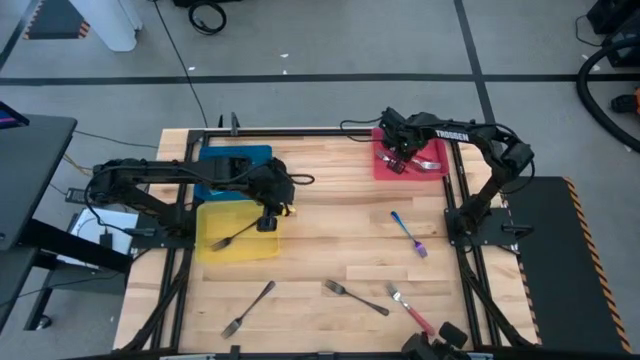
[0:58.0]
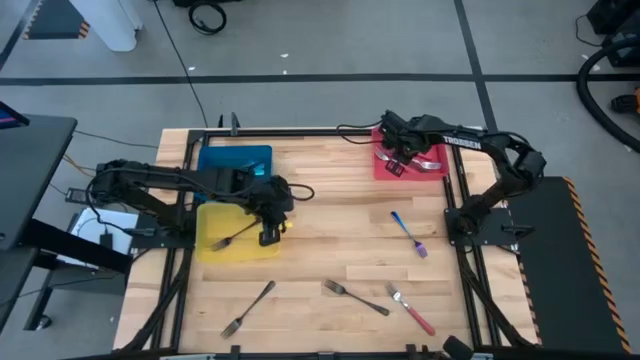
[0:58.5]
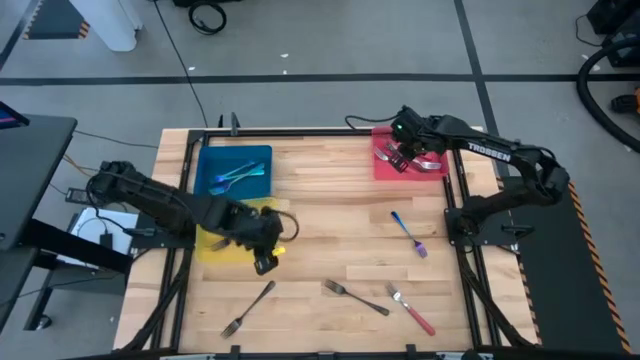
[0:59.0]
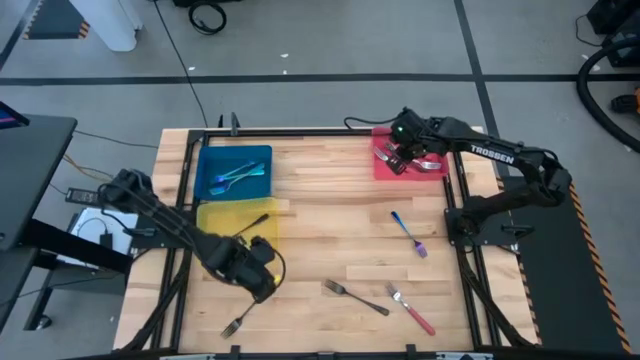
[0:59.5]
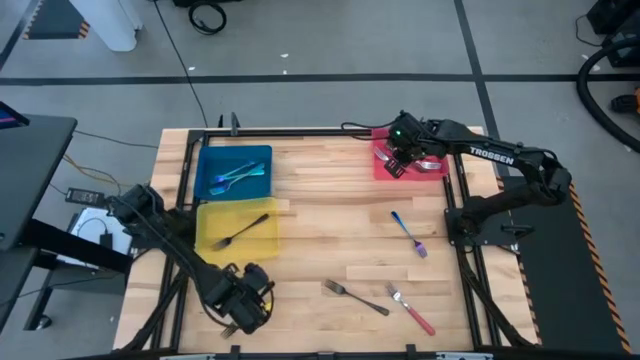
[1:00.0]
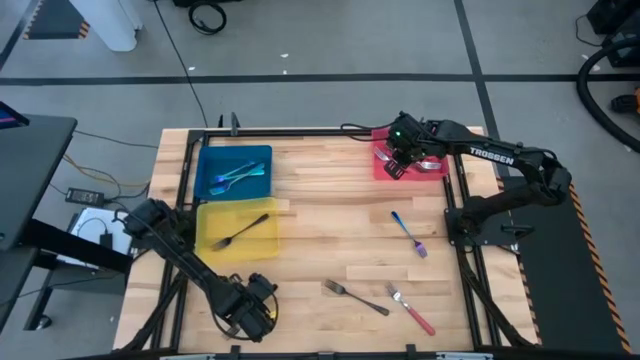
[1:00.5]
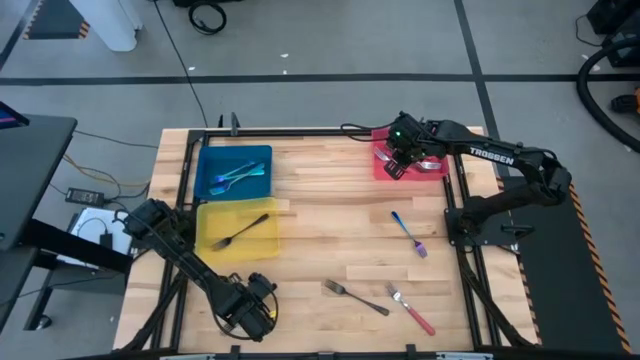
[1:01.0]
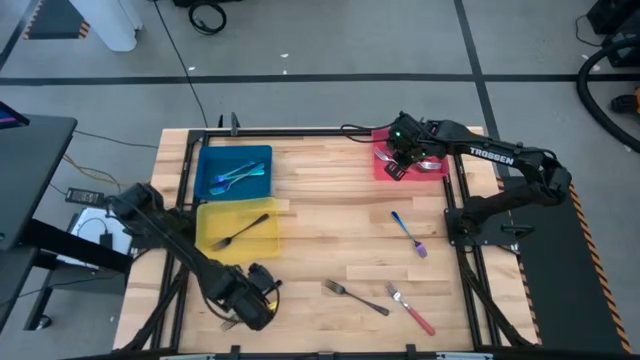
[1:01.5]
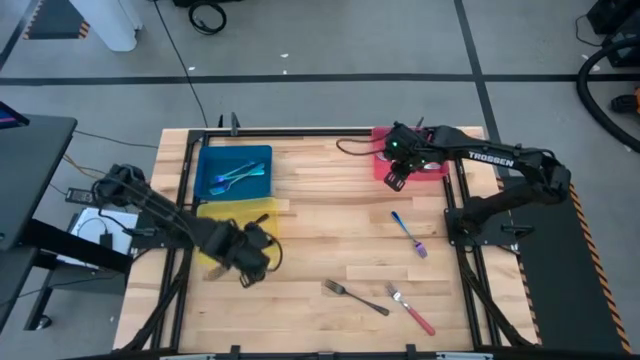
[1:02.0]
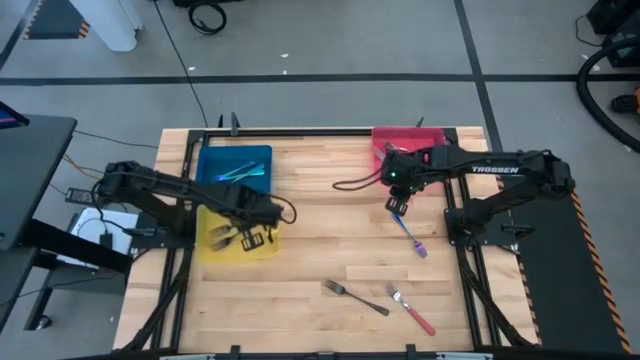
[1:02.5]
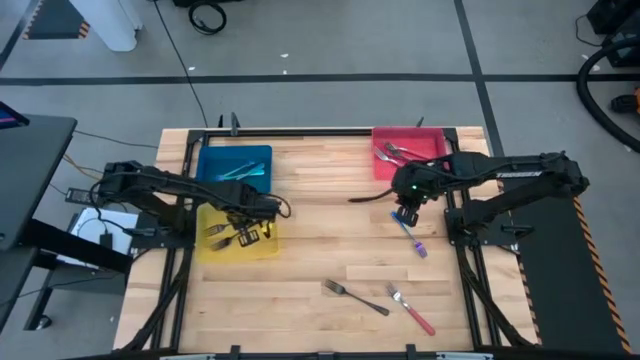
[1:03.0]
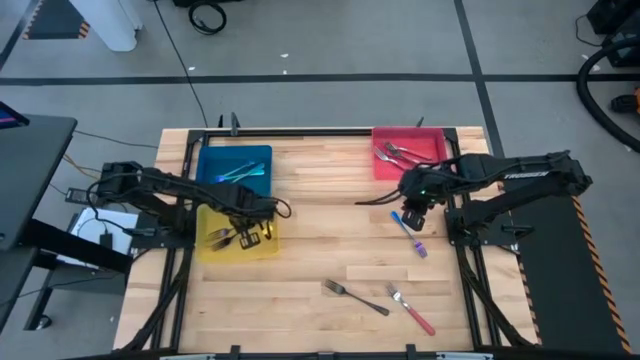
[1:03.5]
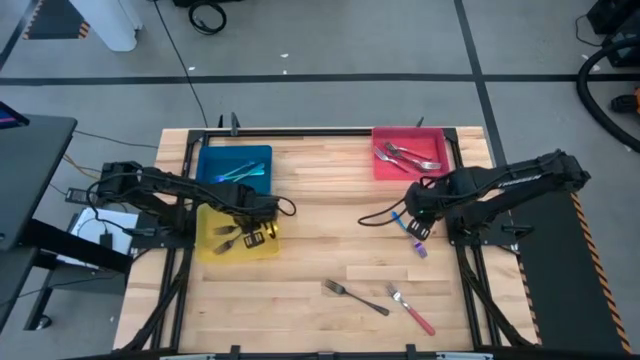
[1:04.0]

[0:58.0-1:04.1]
Task: Sort silverware by color (type)
Put the black fork into the yellow bin

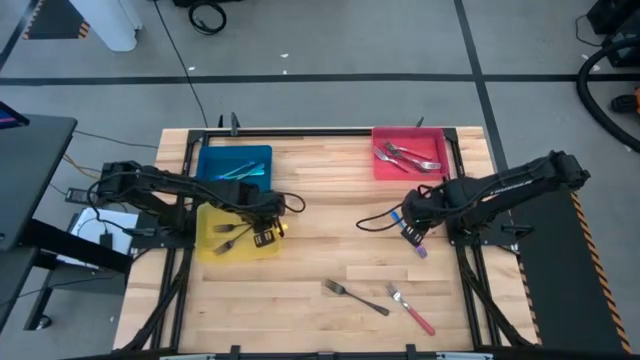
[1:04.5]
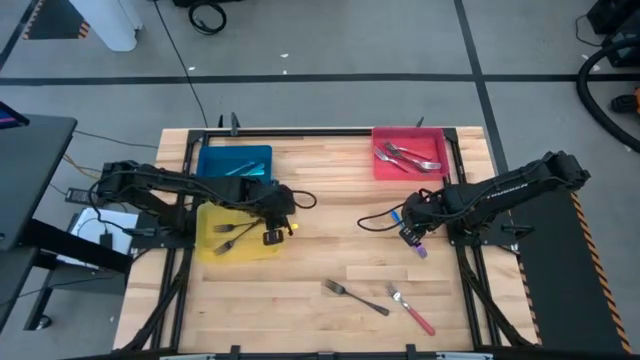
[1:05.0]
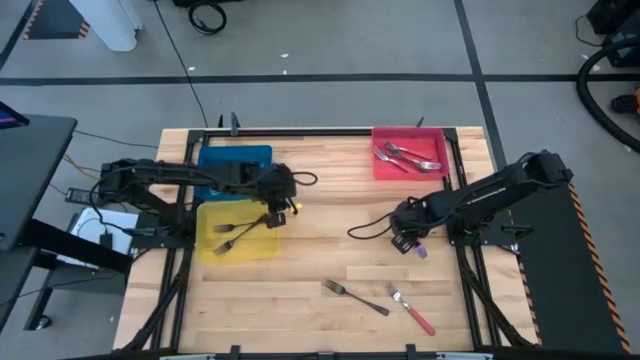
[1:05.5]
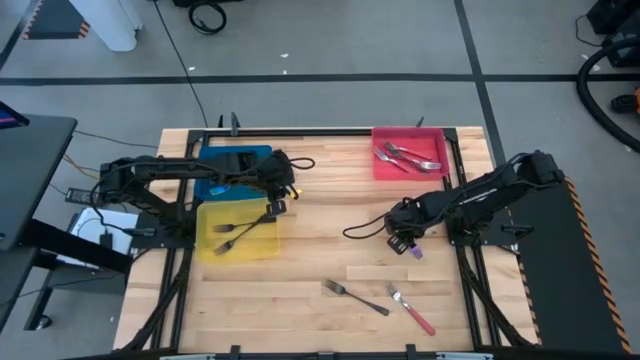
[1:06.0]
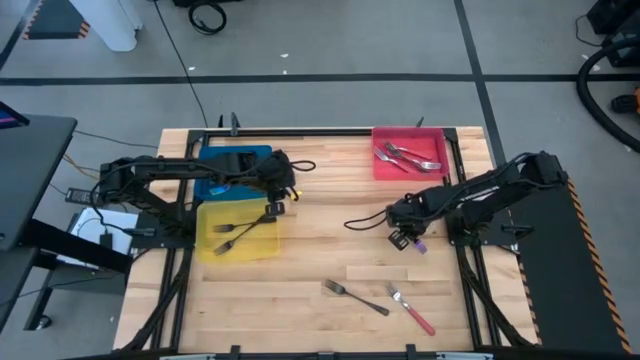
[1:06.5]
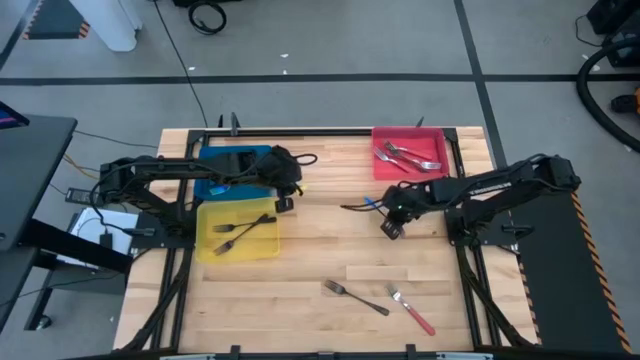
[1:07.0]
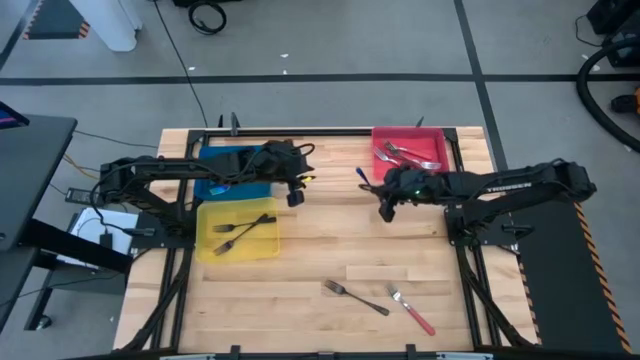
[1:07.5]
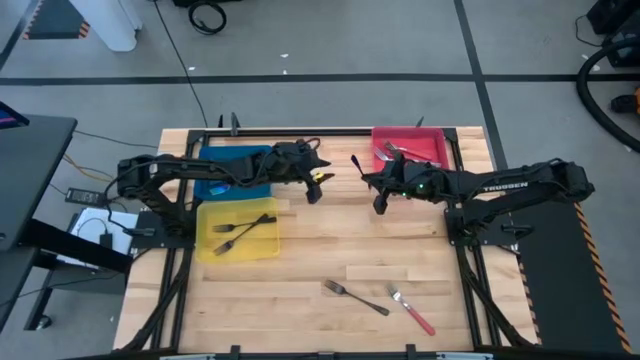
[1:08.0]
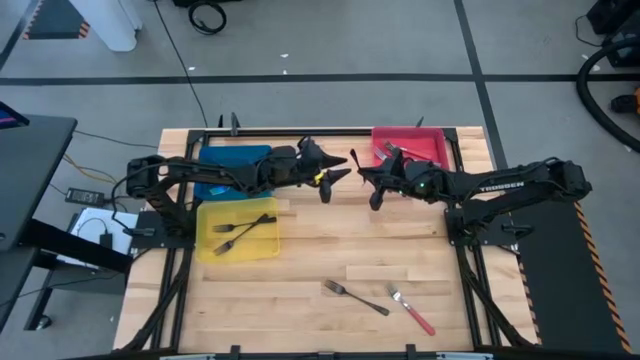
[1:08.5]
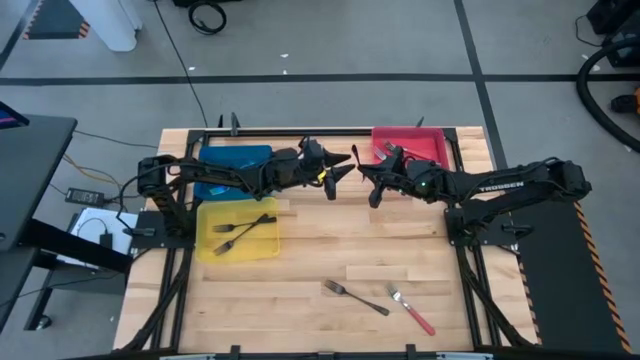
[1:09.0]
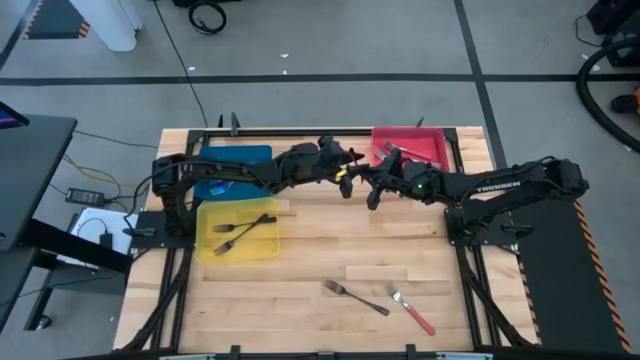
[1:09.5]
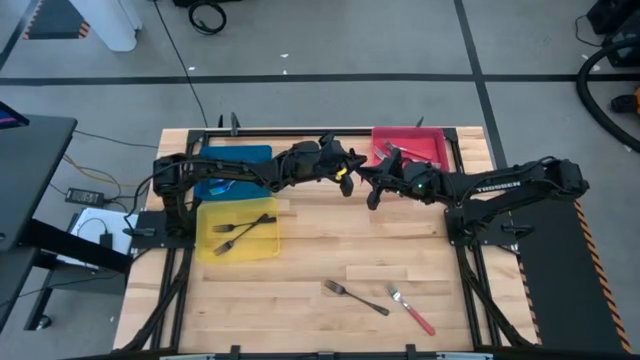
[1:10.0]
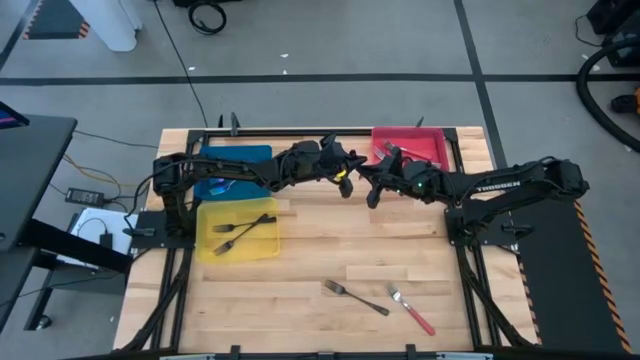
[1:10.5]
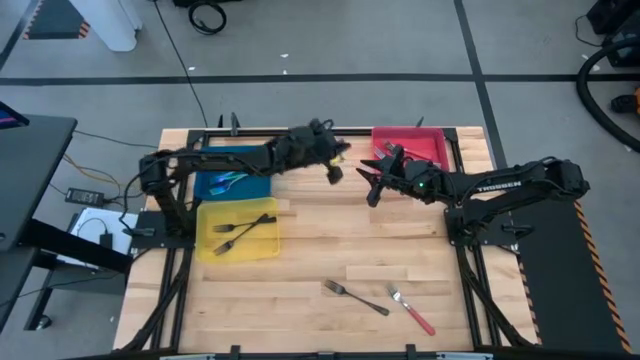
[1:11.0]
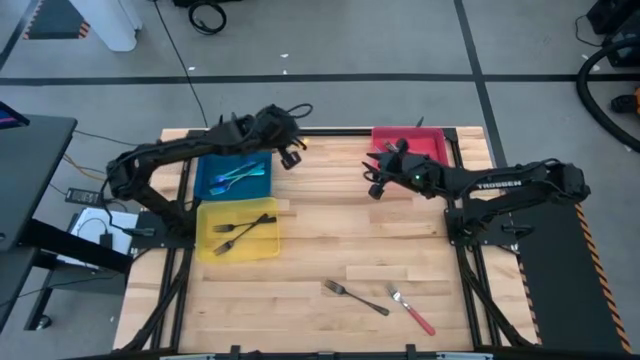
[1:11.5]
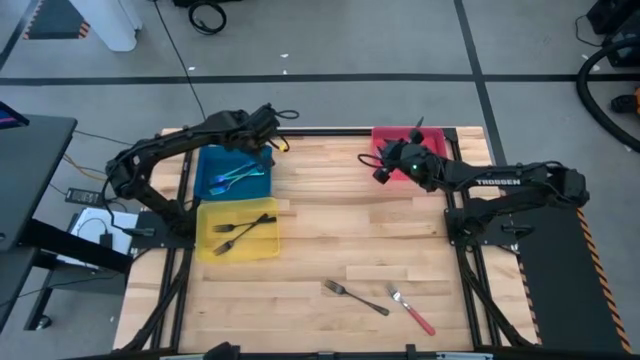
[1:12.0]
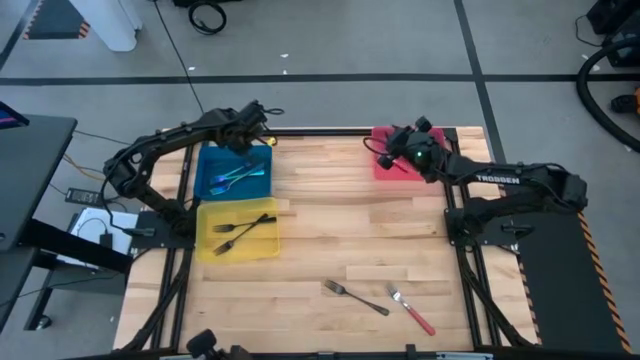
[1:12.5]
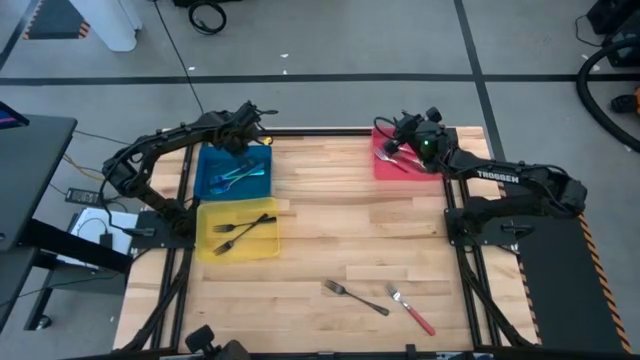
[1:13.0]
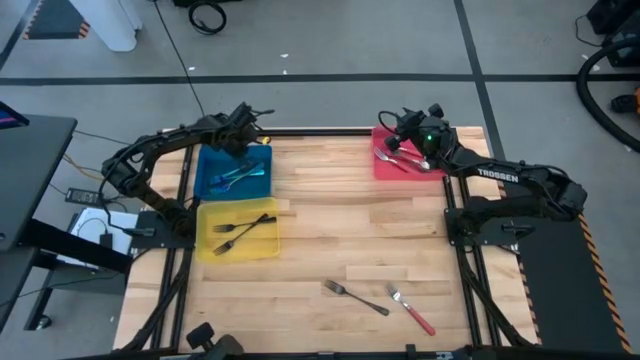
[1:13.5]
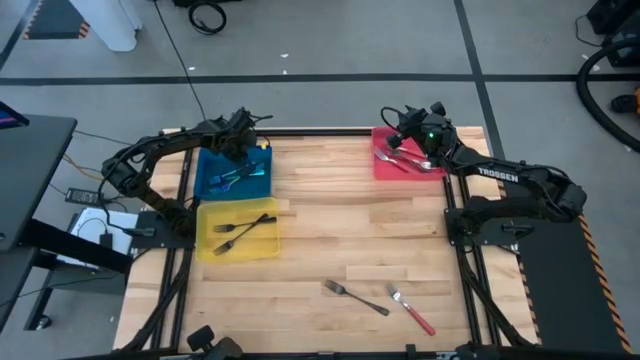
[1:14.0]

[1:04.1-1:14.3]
Put the blue fork into the blue bin

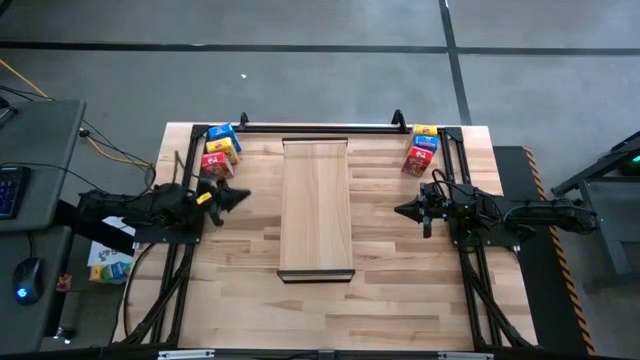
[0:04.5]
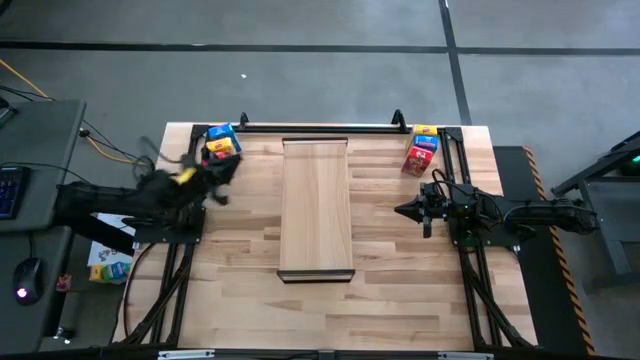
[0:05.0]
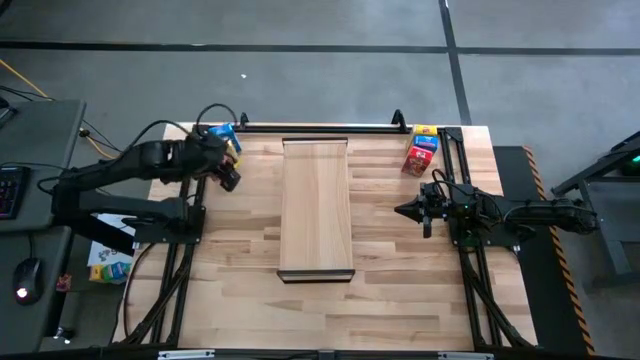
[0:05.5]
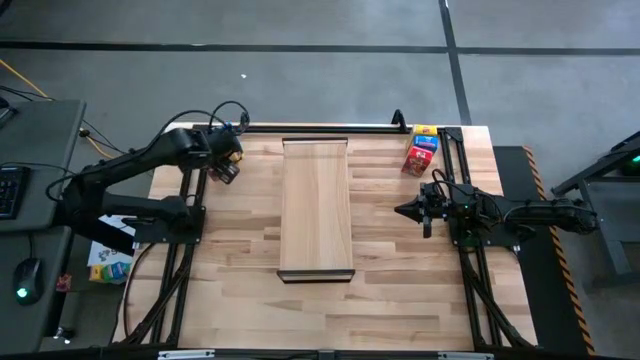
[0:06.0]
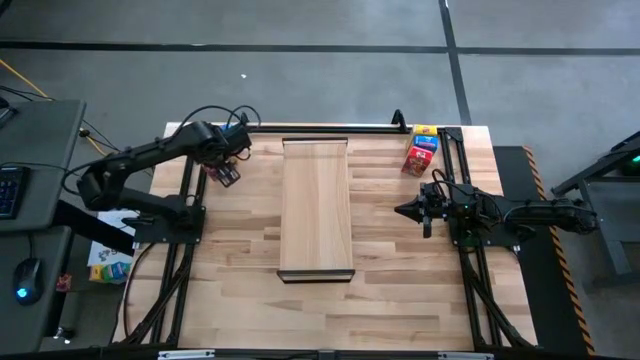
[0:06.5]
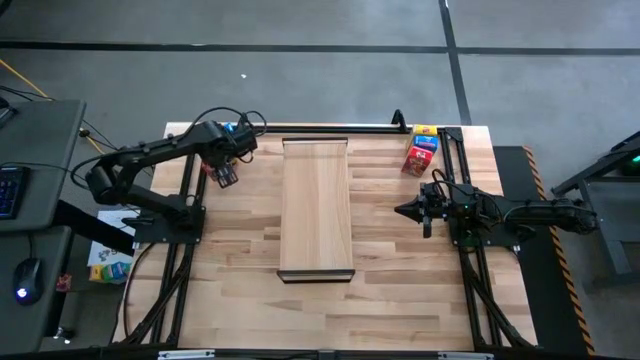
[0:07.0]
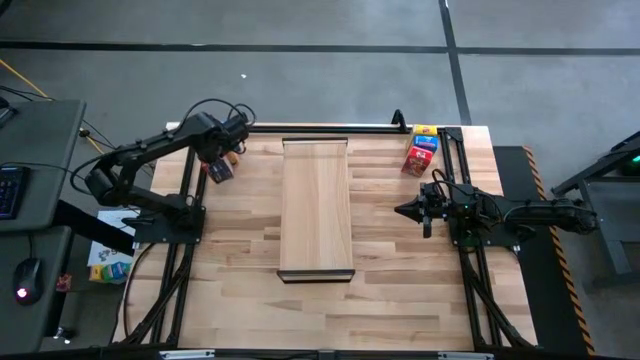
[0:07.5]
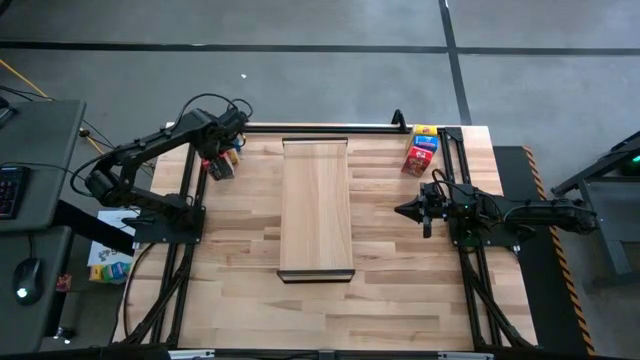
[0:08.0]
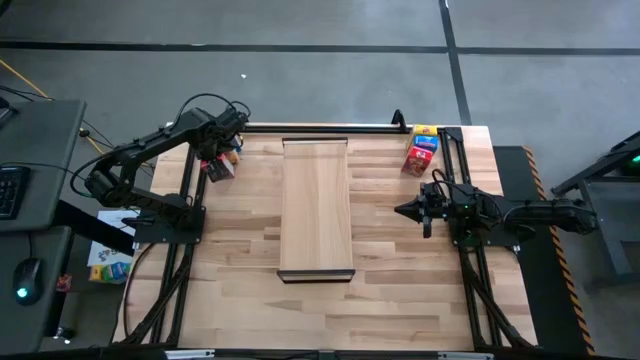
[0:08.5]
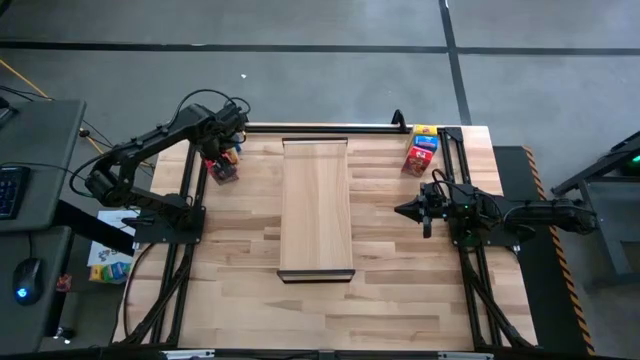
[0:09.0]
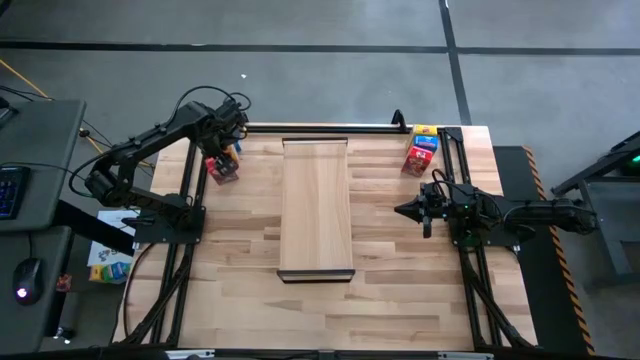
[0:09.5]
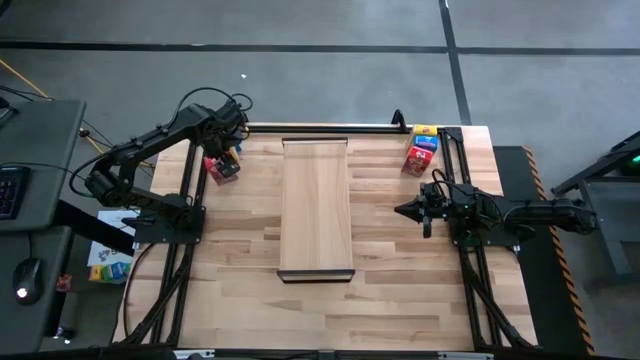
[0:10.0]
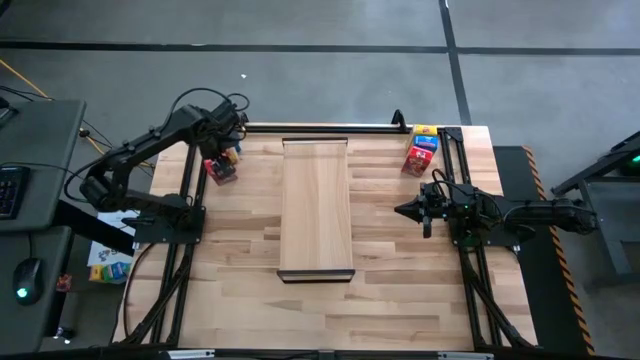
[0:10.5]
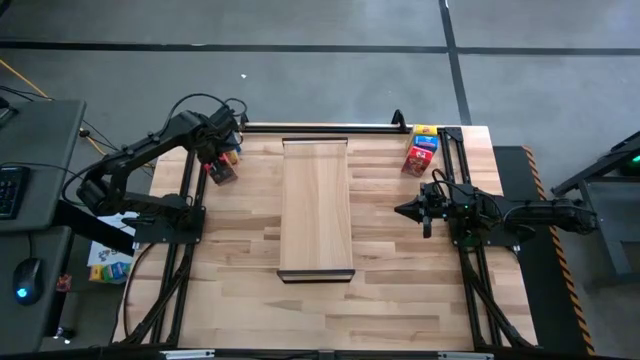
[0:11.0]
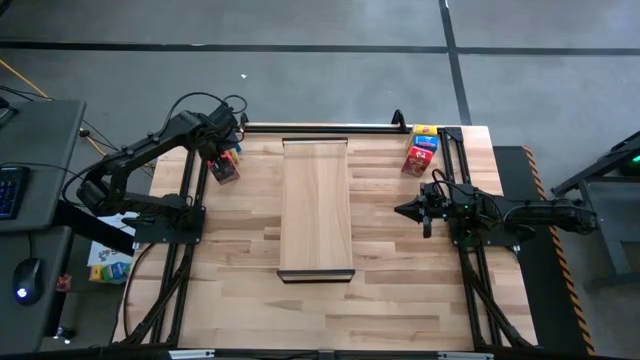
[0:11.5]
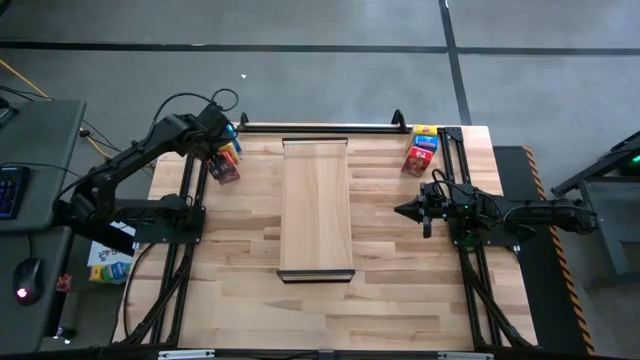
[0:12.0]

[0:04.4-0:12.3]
Task: Stack cereal on shelf
Put the left red cereal box on the shelf
